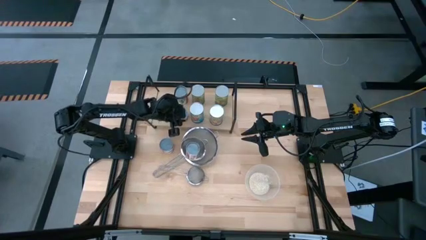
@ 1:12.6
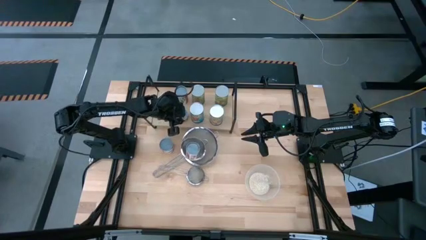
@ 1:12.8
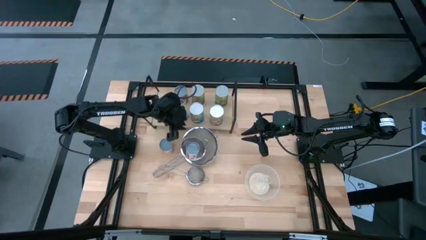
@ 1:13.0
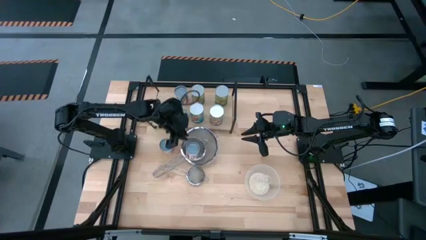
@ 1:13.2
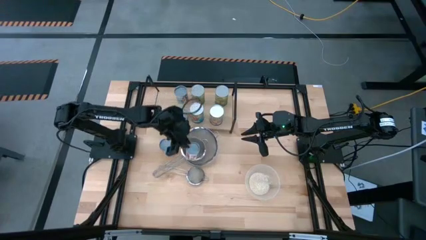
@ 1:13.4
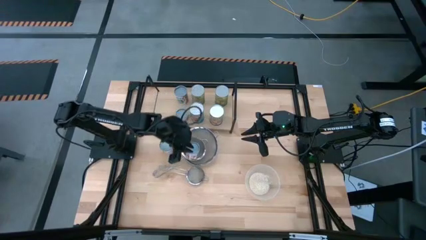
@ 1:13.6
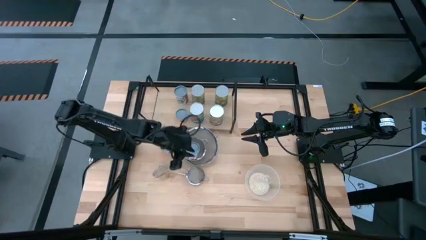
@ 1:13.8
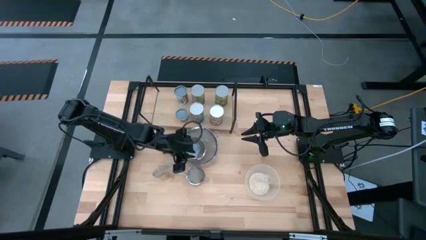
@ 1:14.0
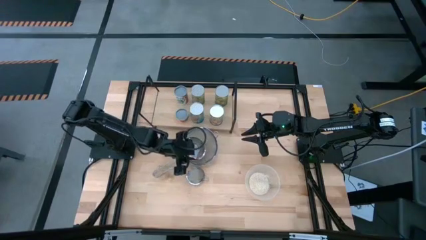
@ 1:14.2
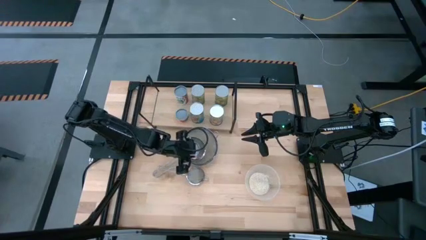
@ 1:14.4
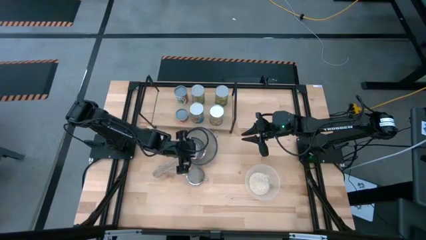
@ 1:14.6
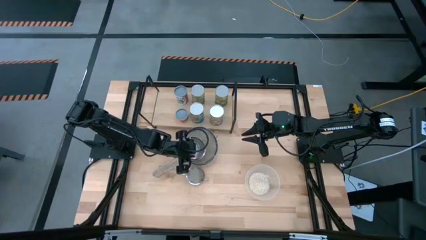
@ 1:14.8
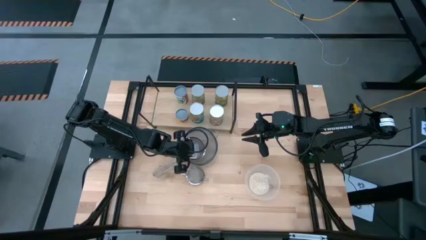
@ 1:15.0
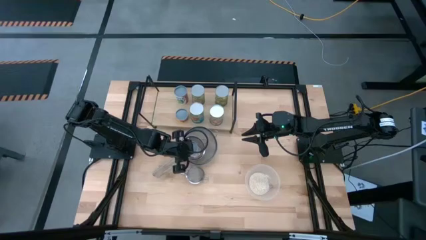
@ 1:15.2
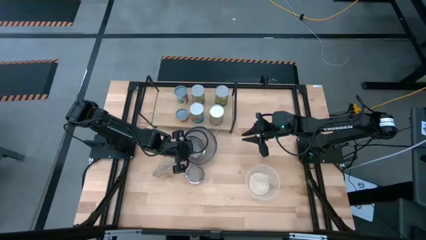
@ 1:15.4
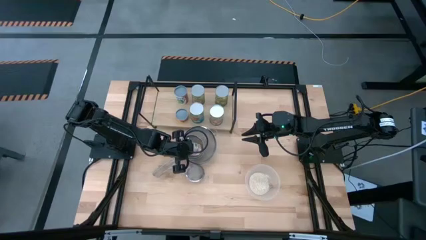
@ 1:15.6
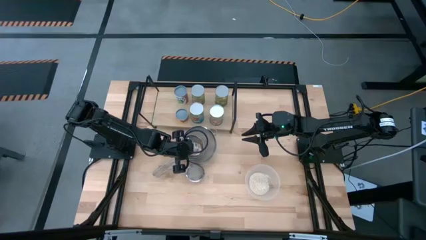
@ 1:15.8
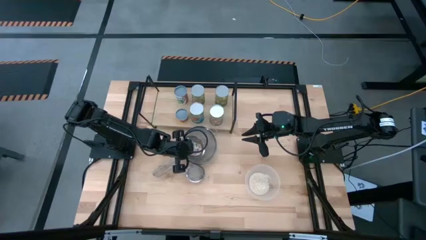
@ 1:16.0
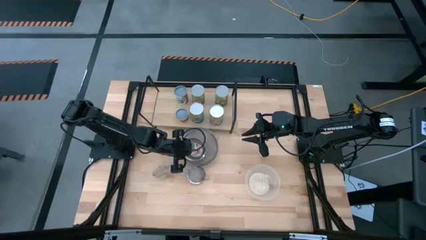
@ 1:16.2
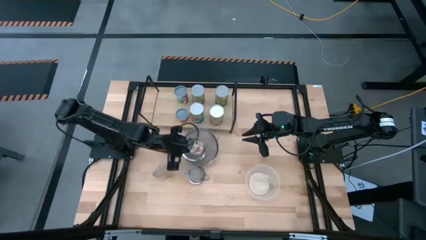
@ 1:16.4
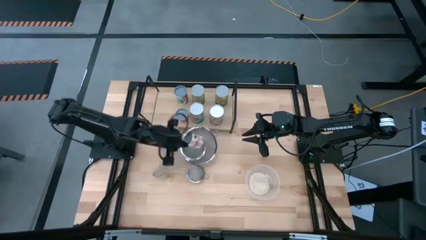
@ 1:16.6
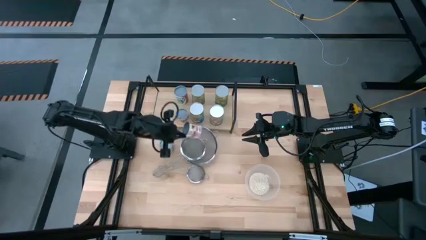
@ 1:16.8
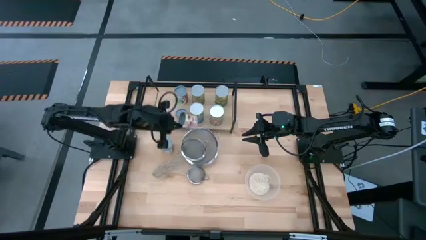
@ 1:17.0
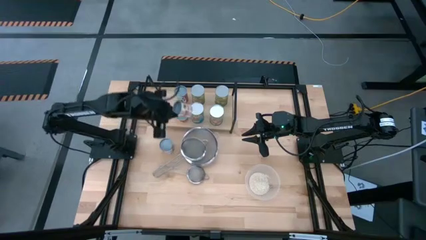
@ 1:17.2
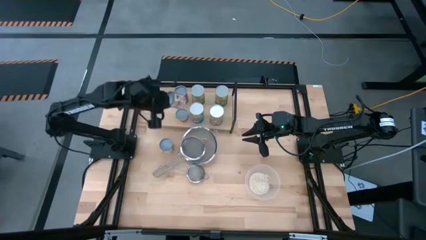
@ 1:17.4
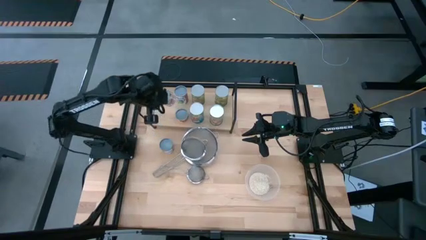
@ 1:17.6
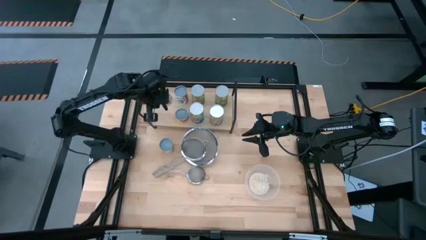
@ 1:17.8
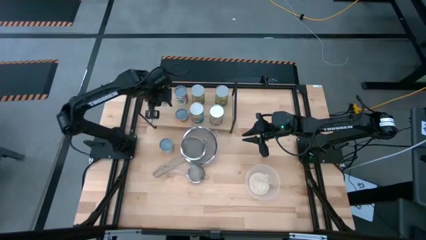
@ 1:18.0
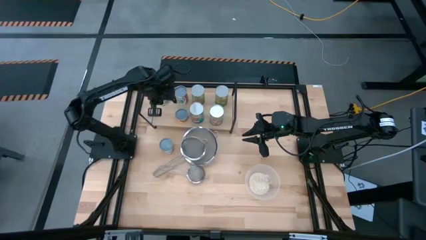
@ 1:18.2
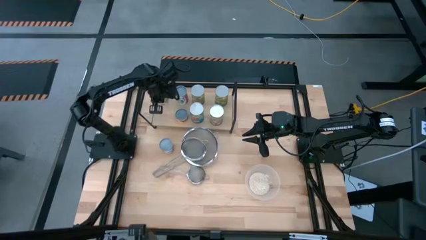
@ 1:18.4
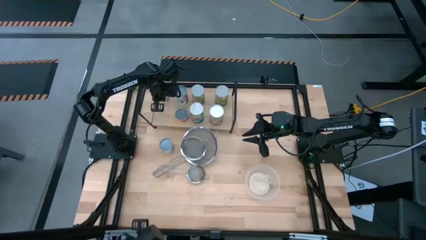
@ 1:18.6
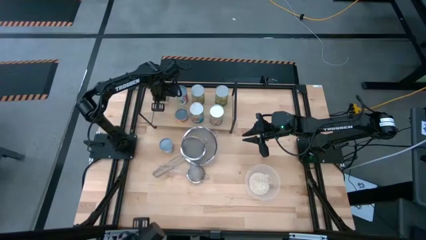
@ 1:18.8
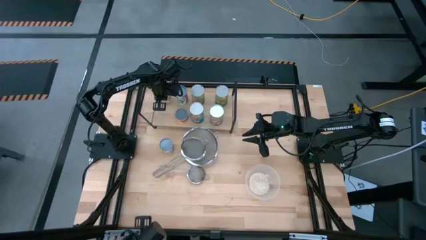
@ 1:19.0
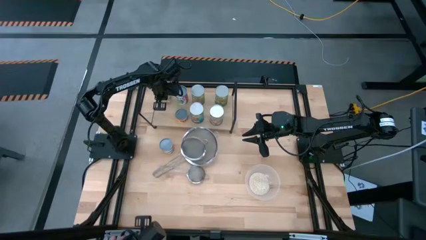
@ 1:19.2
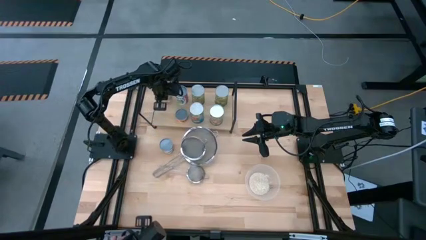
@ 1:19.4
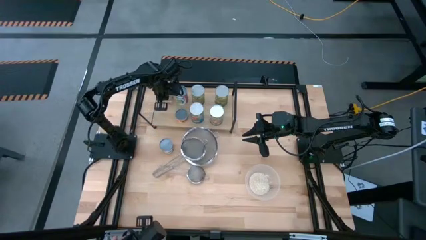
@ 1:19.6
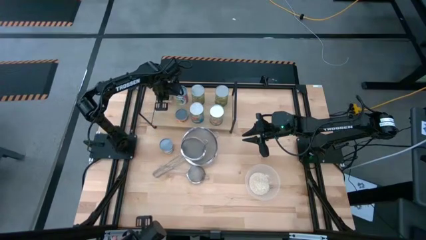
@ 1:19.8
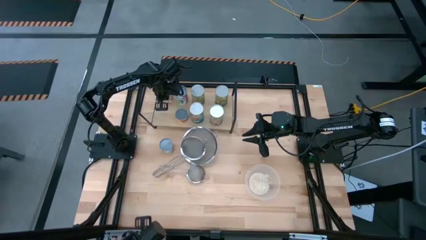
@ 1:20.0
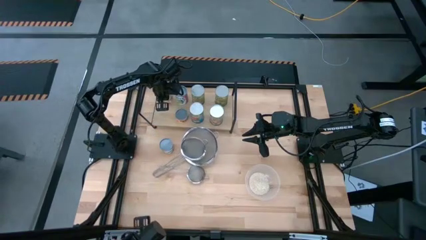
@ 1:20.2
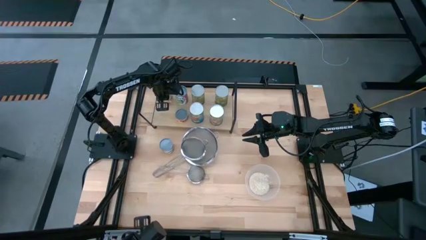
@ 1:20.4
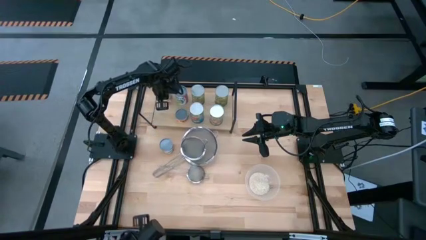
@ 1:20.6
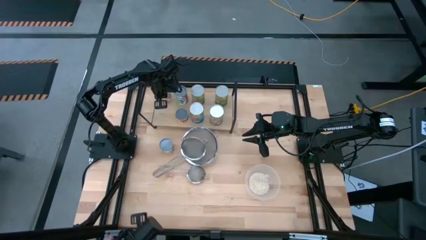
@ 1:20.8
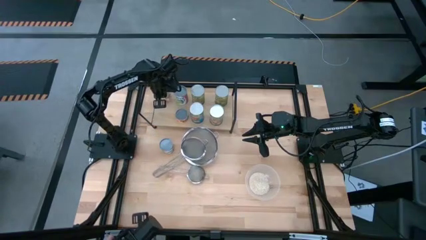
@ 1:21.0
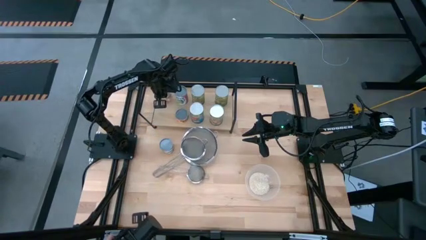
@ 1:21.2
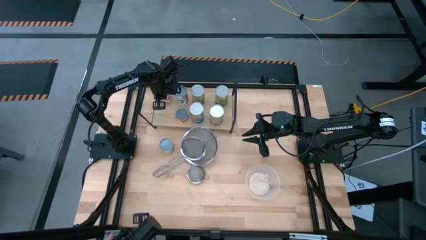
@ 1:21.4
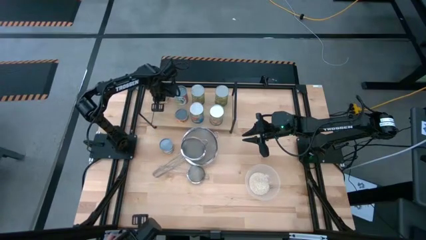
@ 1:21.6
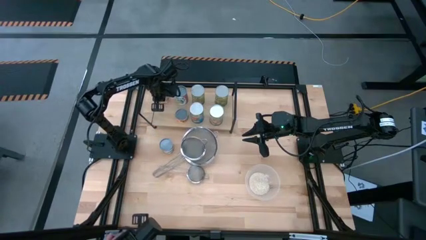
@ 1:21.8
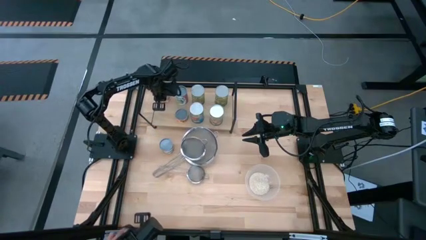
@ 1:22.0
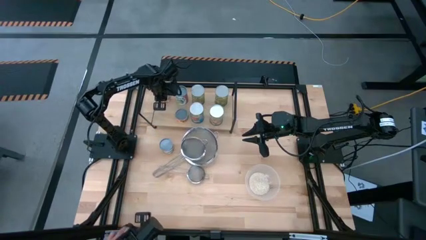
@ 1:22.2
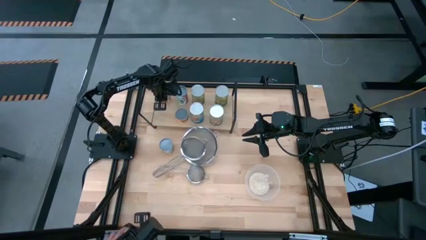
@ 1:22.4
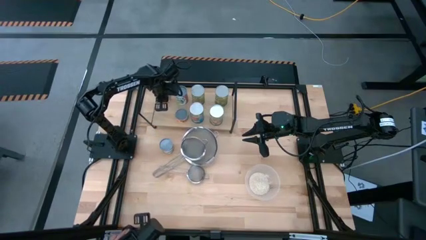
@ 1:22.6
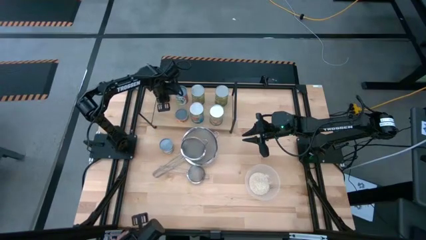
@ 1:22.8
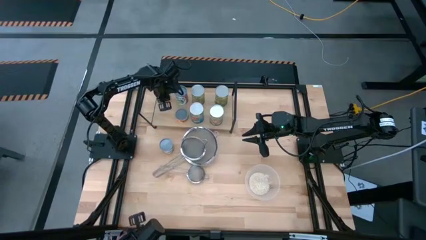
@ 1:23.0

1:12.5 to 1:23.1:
Task: Pick and place cans onto a shelf
Put the diced tomatoes on the shelf
